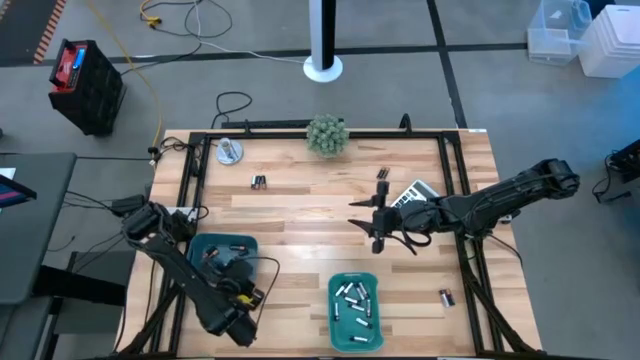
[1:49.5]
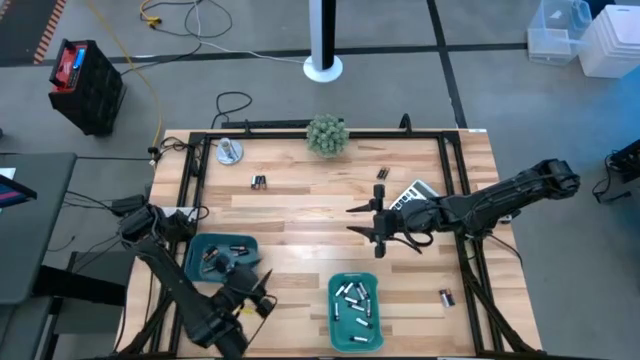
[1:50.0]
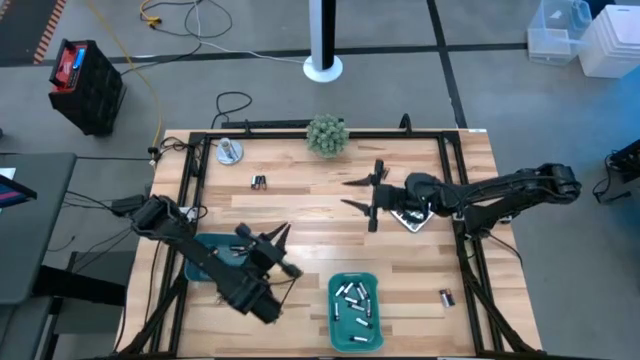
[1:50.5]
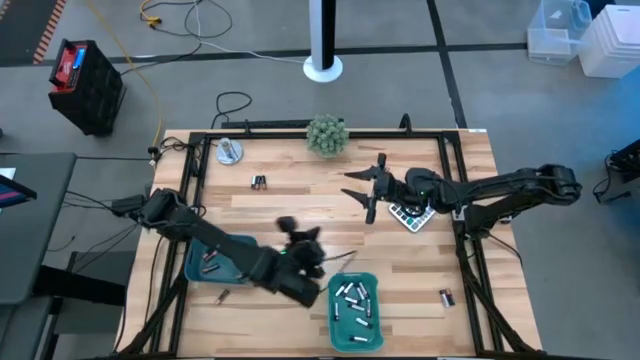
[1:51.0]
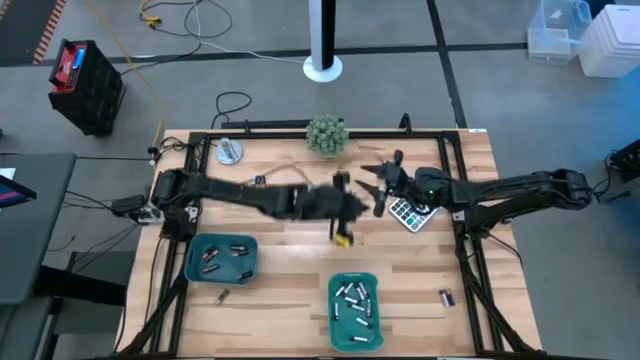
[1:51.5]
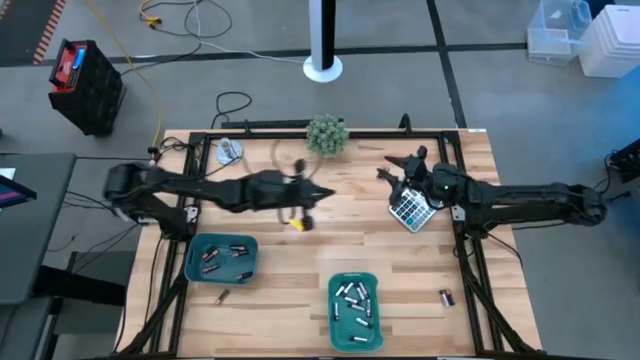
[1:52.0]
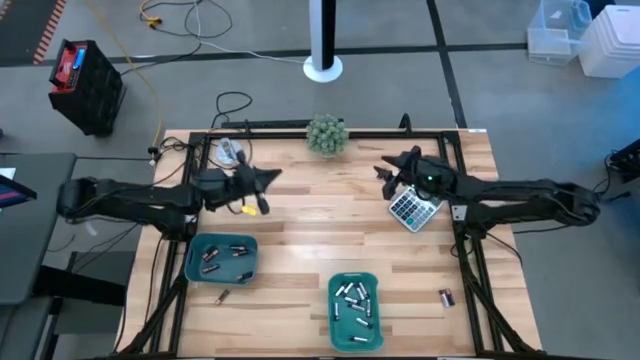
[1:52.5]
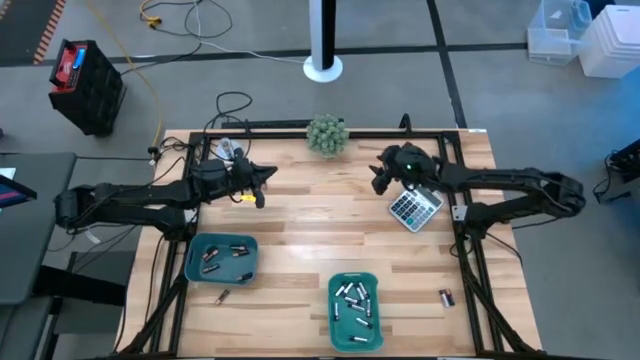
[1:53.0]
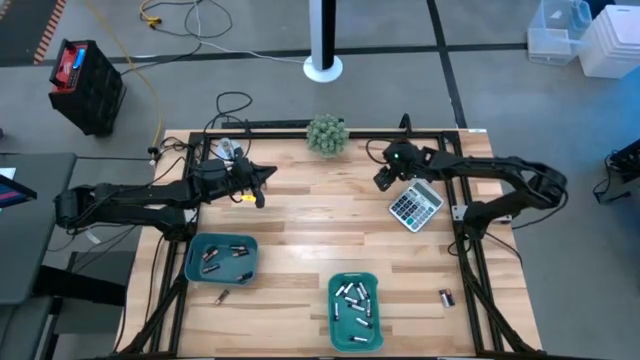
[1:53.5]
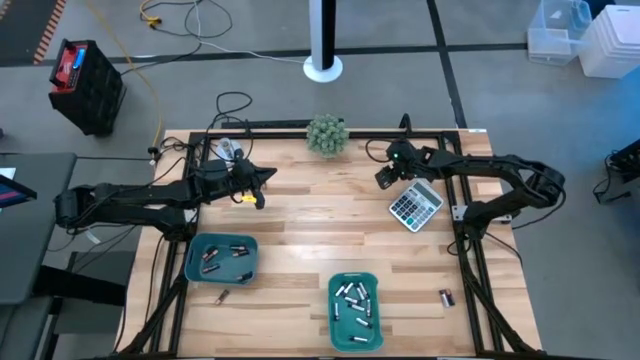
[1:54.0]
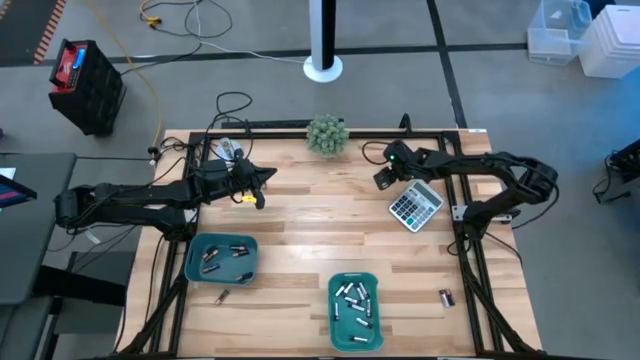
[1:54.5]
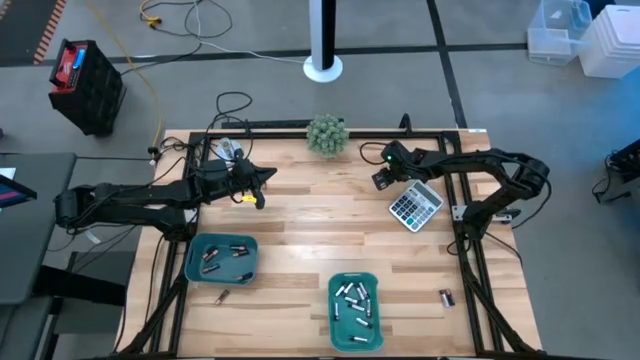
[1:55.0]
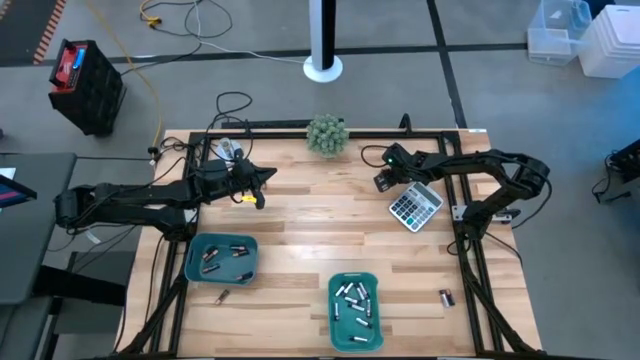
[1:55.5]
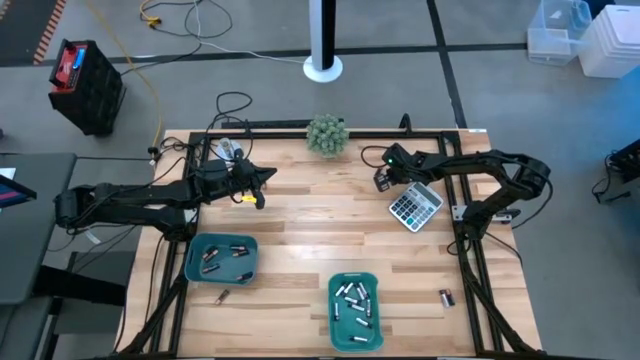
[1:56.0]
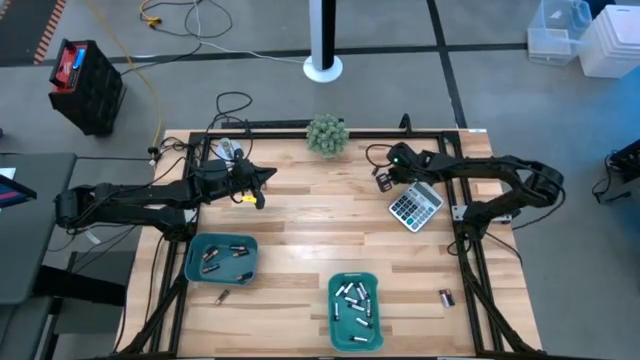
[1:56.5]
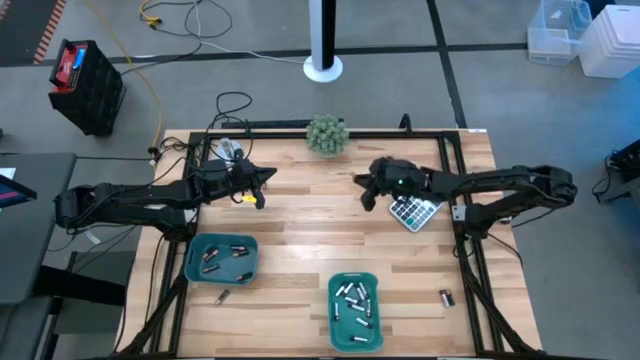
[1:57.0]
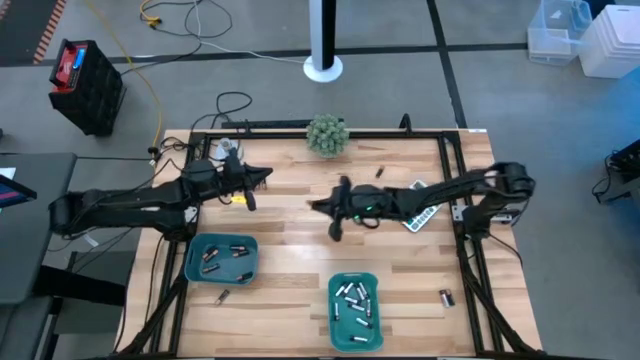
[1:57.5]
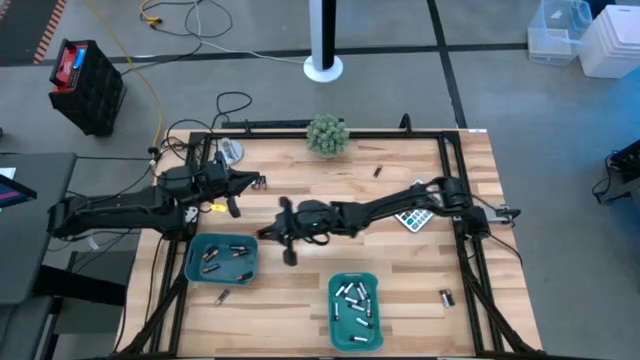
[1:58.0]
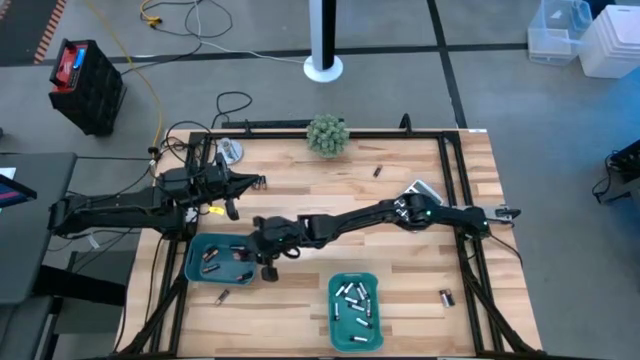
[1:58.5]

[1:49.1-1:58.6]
Task: Sort batteries
Put the black battery into the blue bin

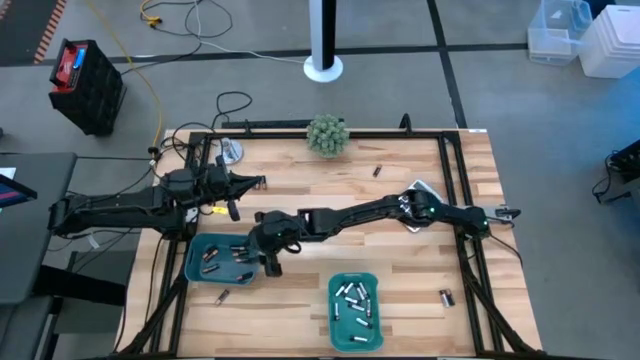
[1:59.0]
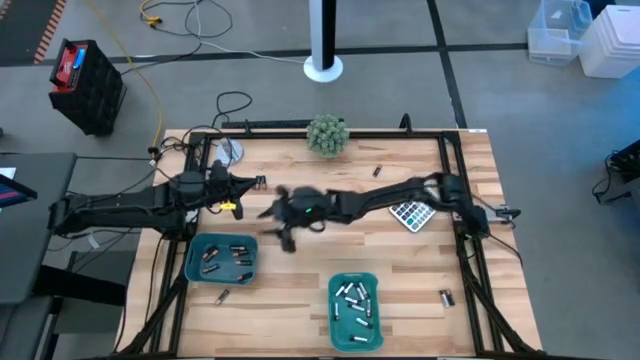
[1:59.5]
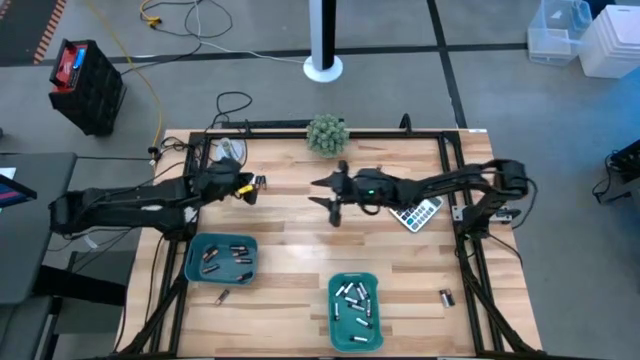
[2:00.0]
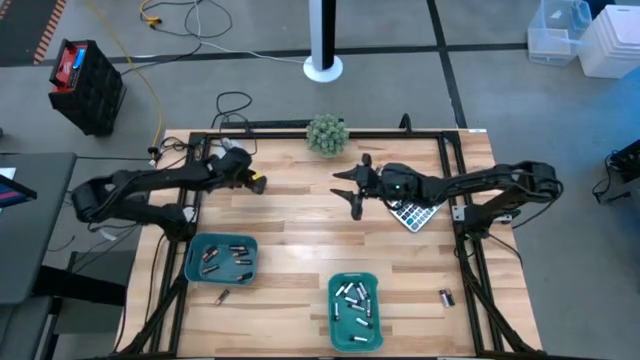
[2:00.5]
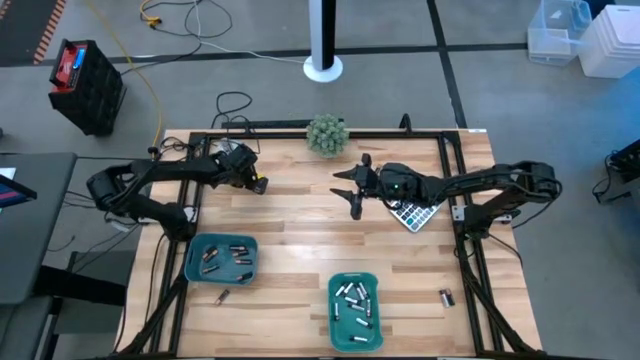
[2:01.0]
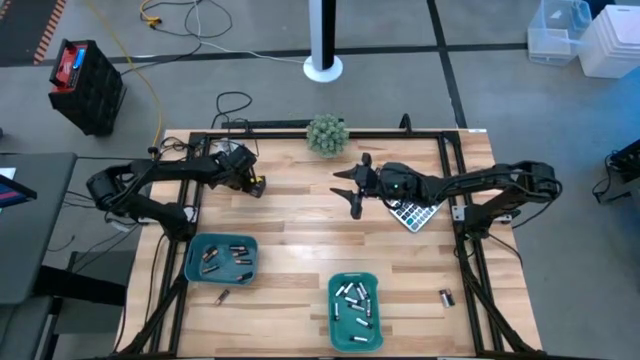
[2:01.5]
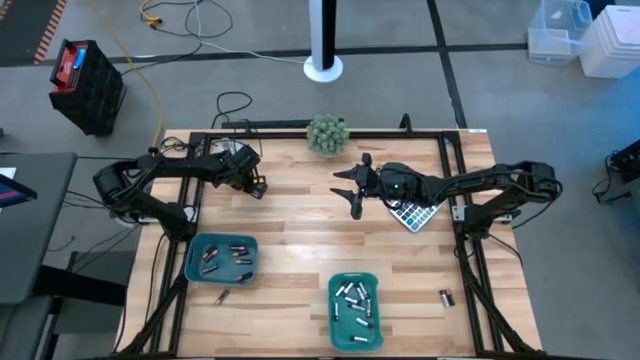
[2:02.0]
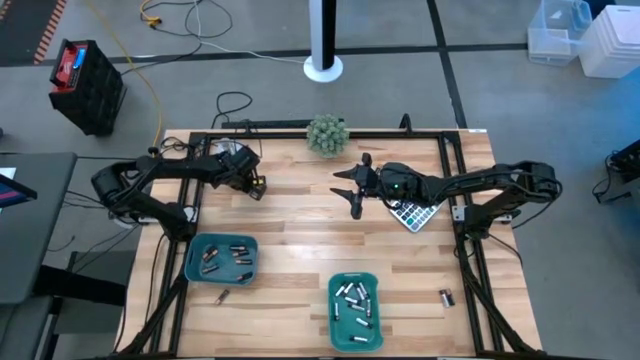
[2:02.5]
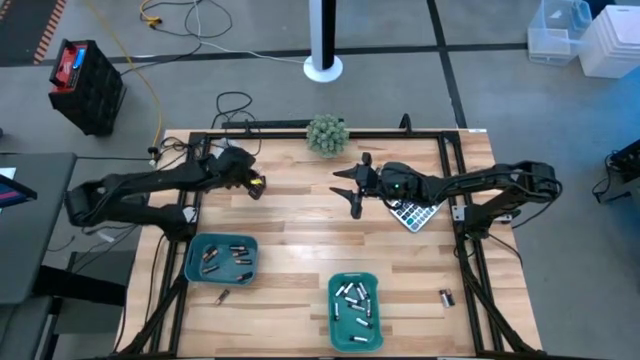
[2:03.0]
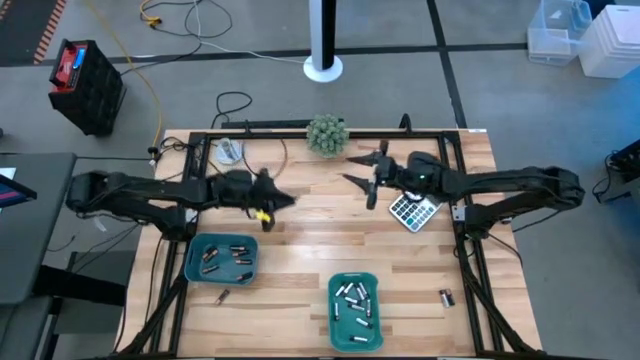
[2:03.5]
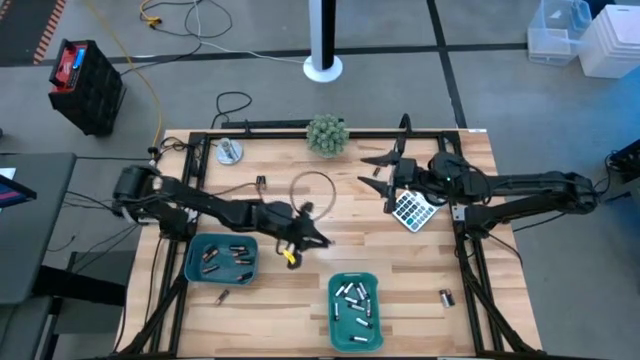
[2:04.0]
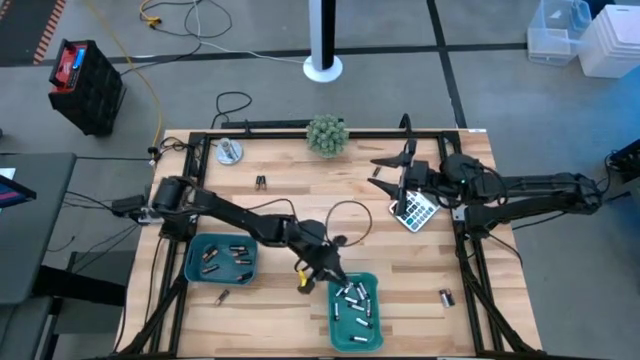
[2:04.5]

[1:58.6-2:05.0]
Put the silver battery into the green bin

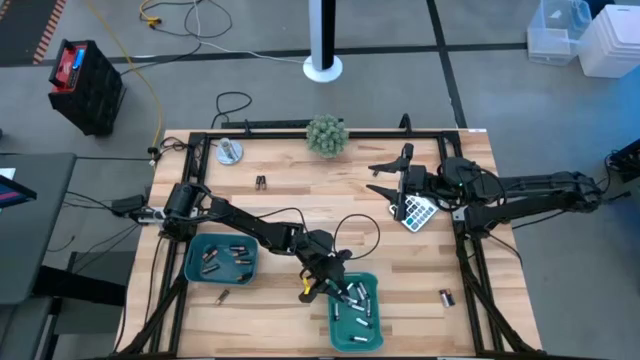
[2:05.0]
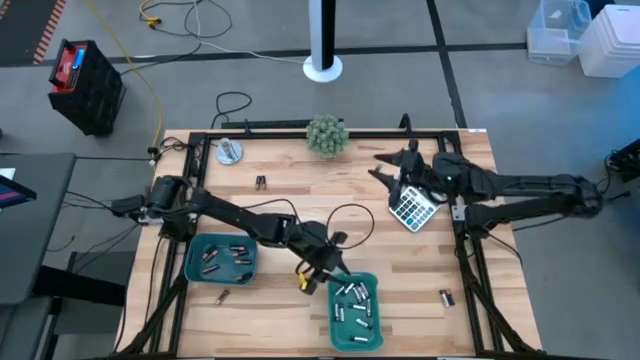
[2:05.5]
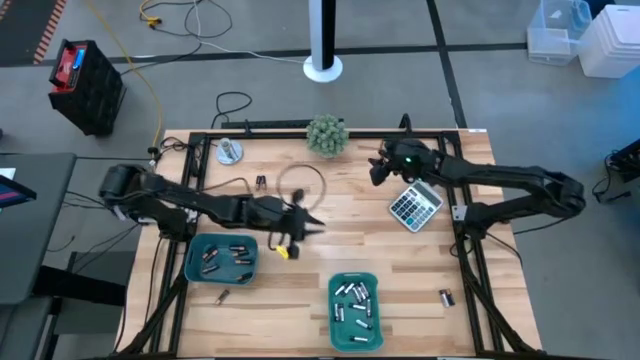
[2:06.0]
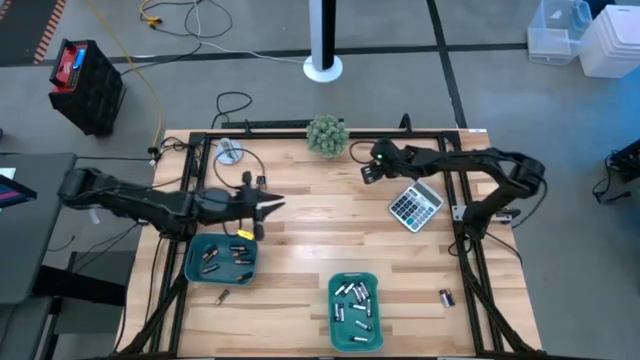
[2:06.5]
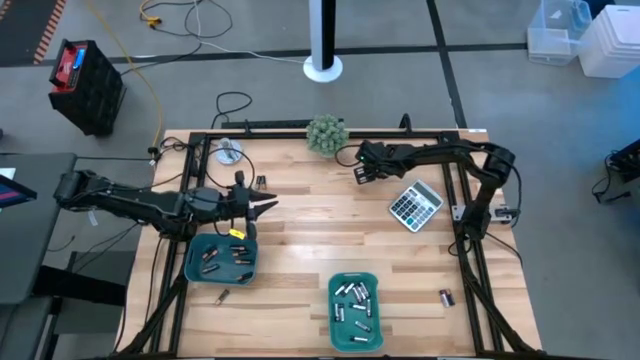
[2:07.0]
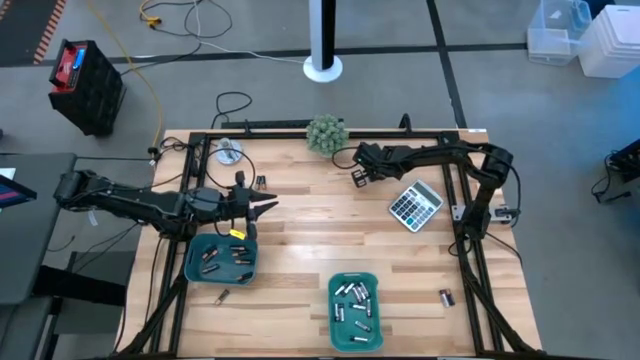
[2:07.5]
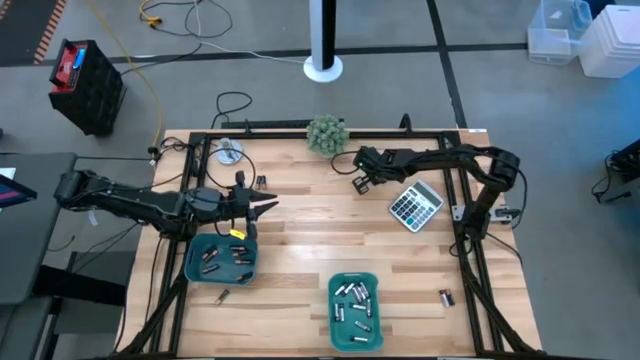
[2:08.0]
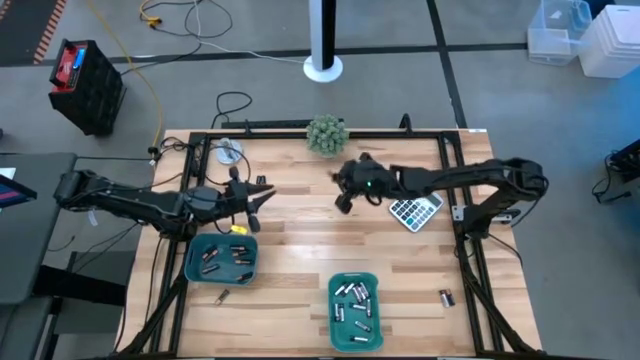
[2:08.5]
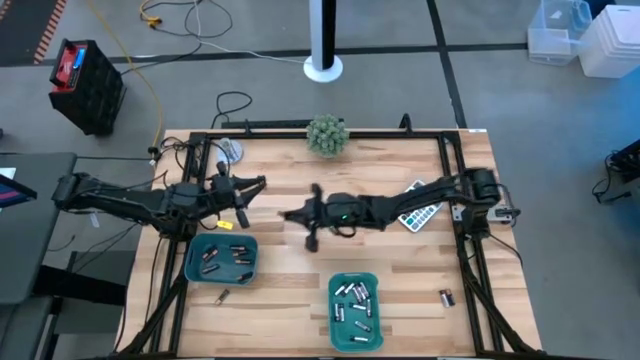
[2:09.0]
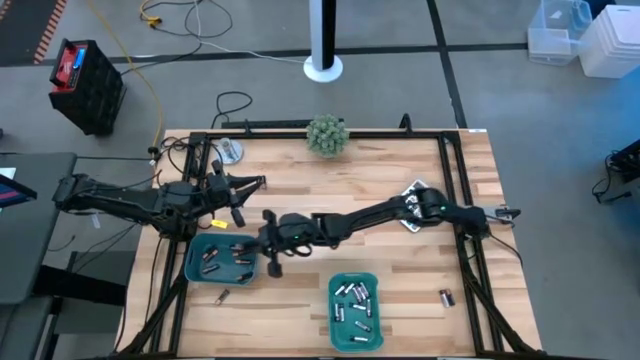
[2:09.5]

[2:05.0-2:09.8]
Put the black battery into the blue bin
